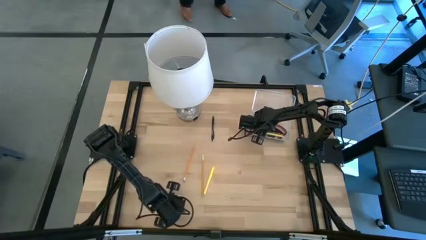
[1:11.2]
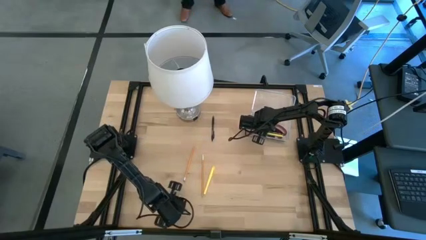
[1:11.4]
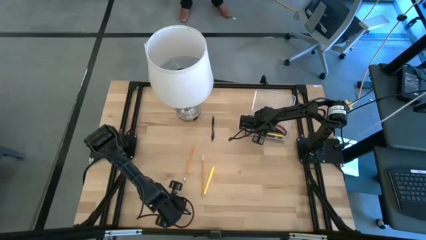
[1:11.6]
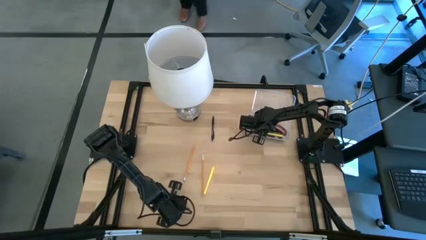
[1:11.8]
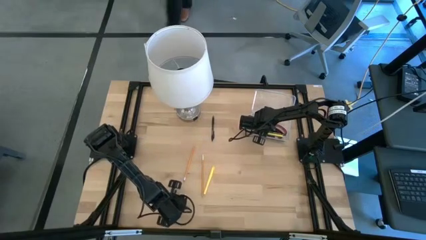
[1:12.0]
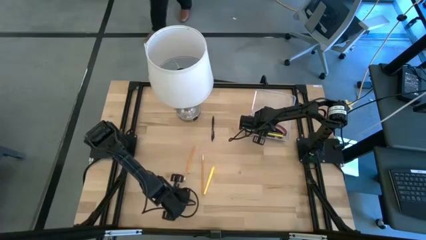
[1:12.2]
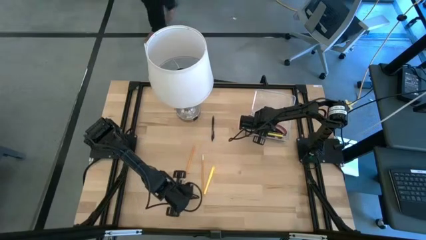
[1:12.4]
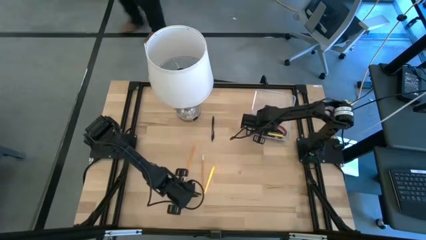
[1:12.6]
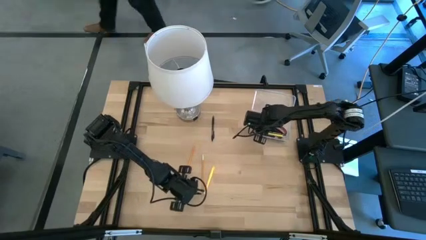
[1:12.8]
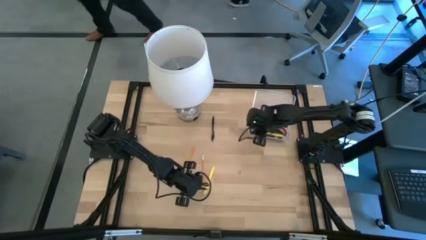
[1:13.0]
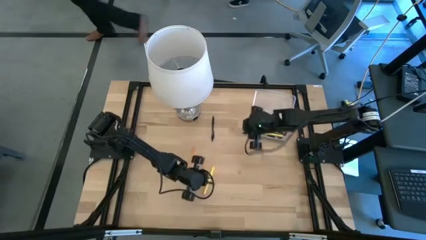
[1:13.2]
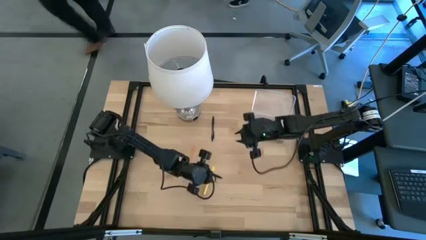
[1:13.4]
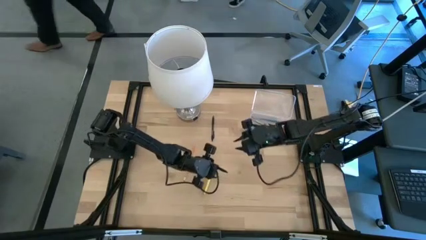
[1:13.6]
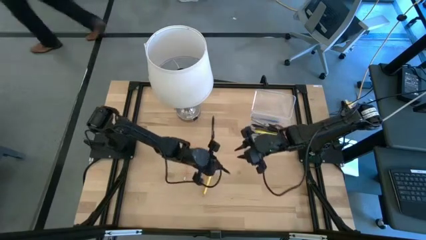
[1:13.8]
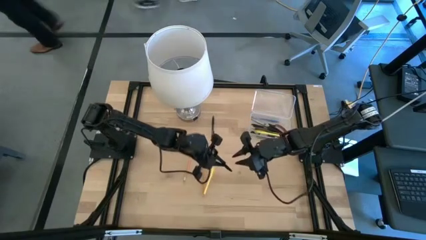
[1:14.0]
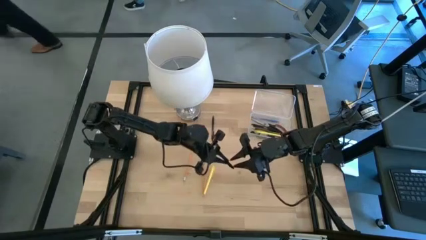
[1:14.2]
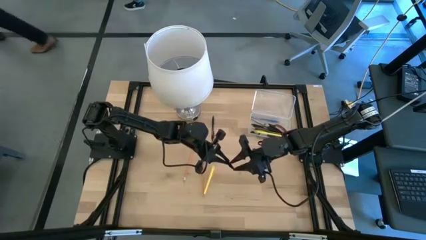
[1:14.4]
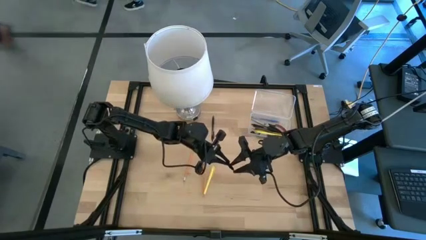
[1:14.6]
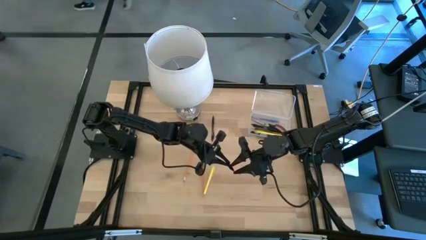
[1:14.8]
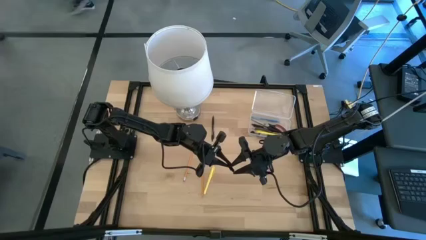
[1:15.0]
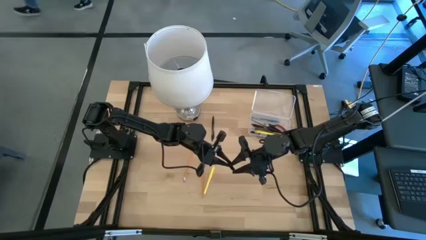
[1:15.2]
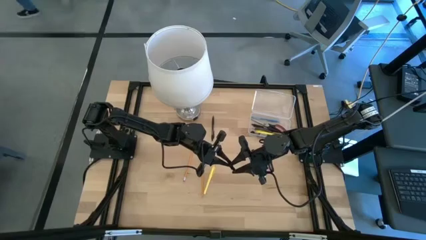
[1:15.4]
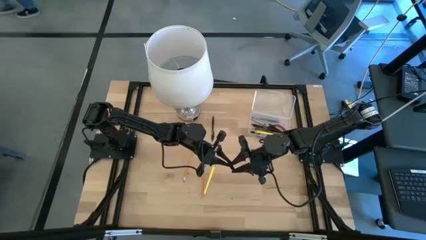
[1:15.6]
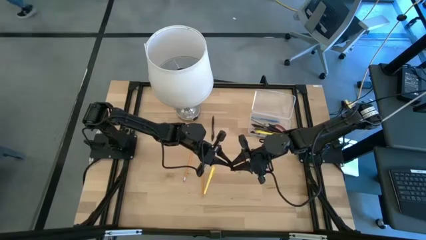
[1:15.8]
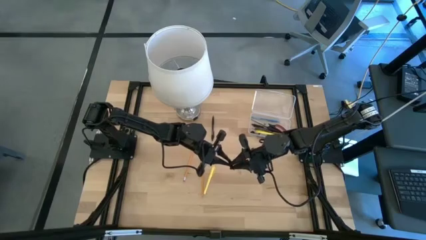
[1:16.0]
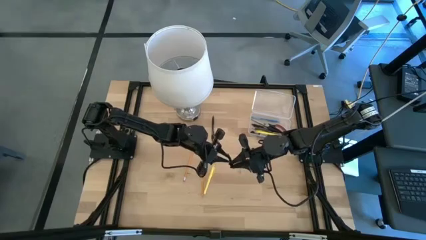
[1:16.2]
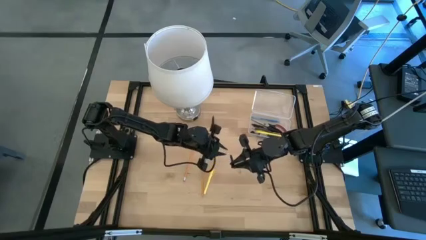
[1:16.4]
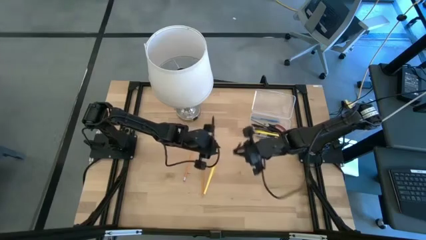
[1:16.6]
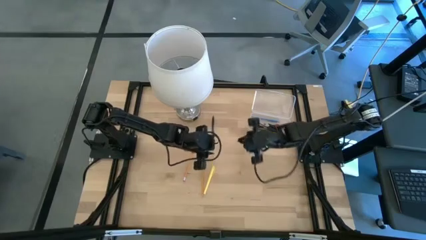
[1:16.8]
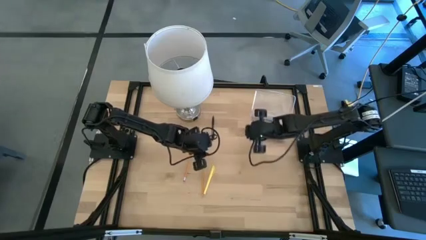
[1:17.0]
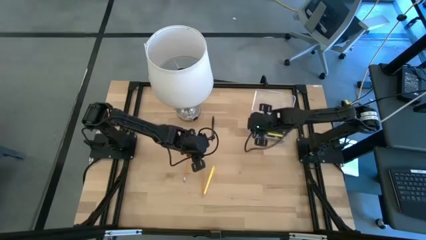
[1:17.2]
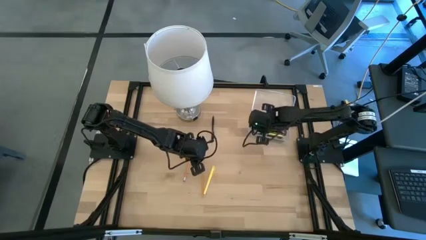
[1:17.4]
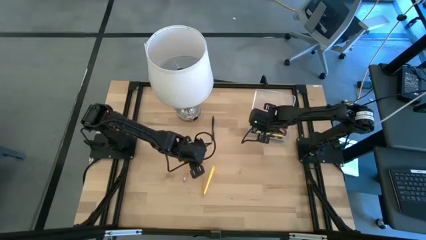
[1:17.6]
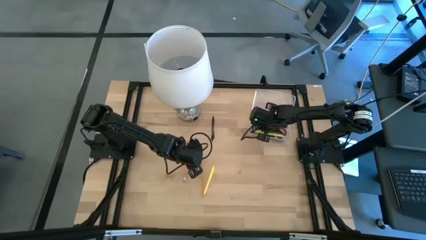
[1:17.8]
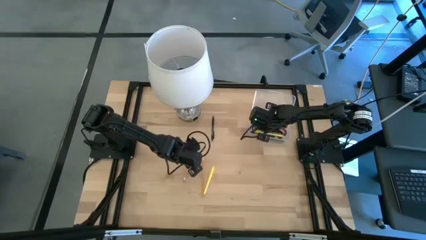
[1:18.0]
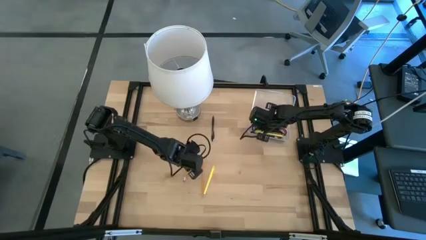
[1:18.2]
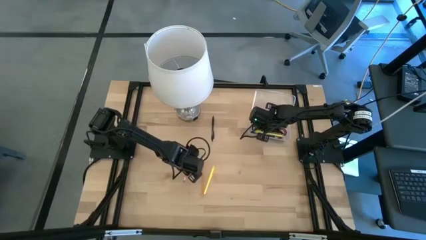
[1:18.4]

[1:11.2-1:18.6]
Task: Pick & place school supplies into a supply box
Put the black pen into the transparent supply box

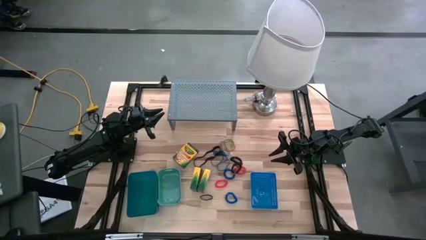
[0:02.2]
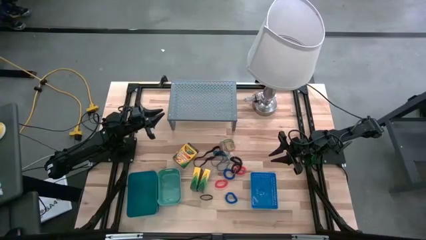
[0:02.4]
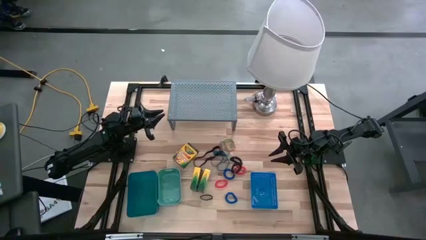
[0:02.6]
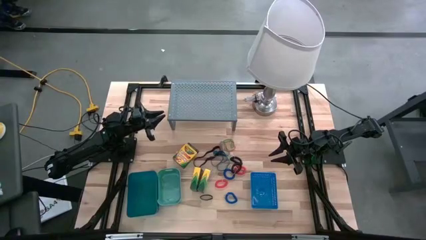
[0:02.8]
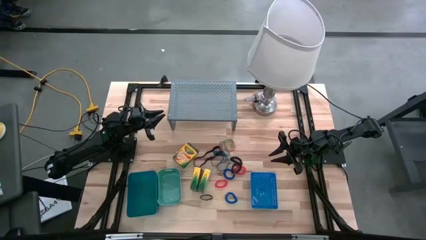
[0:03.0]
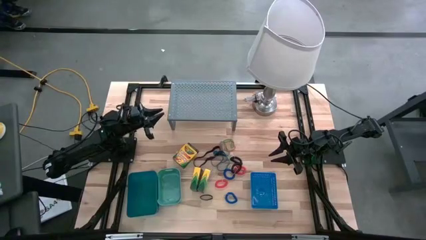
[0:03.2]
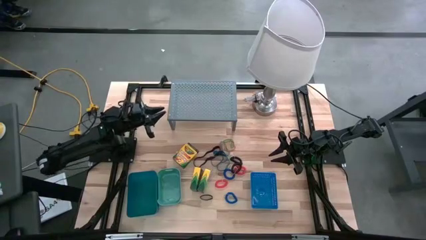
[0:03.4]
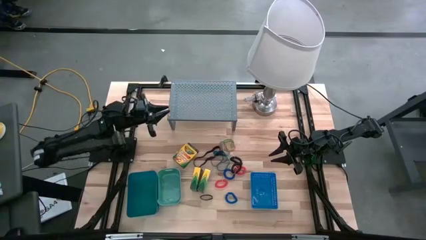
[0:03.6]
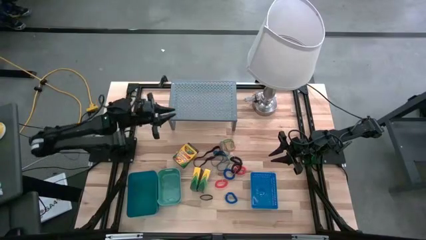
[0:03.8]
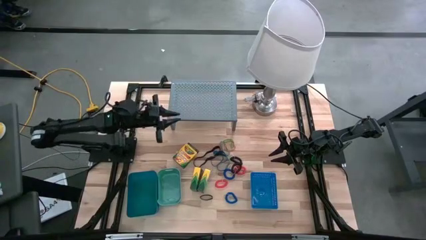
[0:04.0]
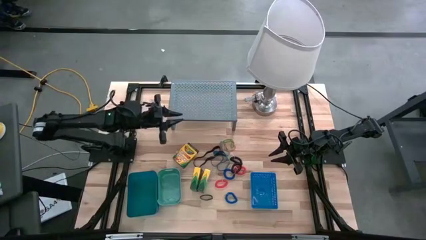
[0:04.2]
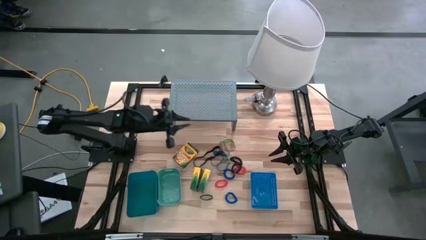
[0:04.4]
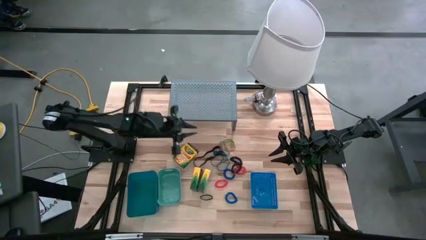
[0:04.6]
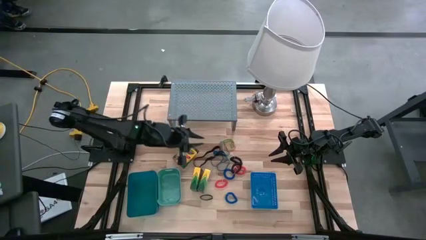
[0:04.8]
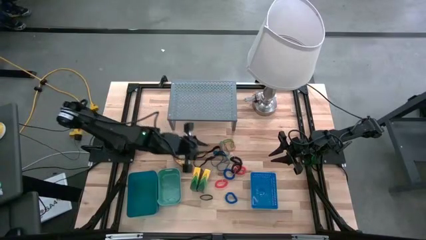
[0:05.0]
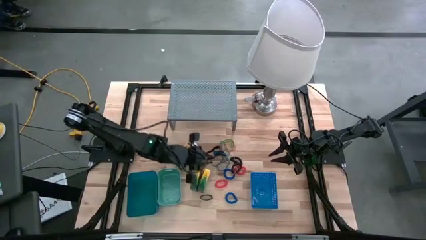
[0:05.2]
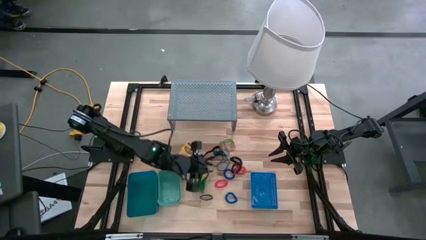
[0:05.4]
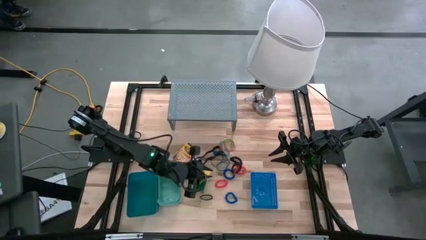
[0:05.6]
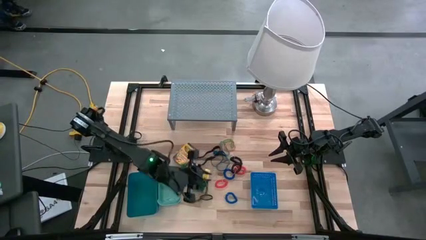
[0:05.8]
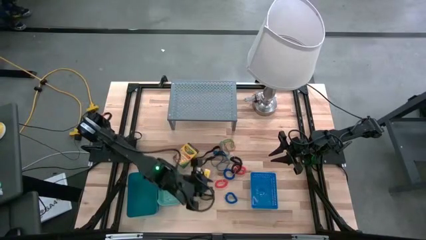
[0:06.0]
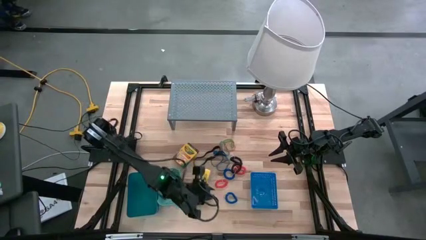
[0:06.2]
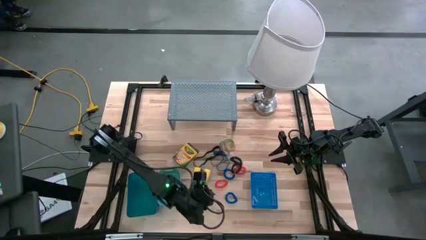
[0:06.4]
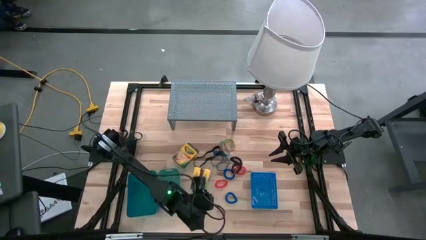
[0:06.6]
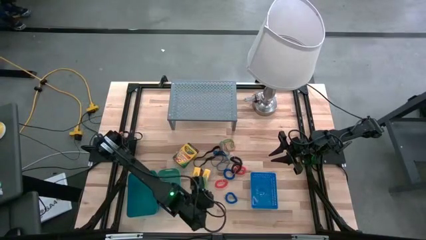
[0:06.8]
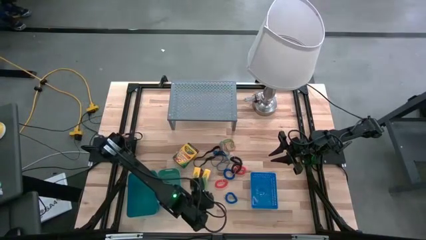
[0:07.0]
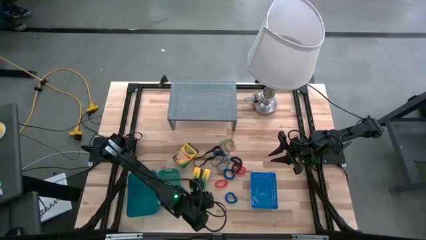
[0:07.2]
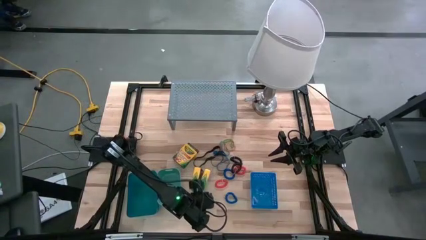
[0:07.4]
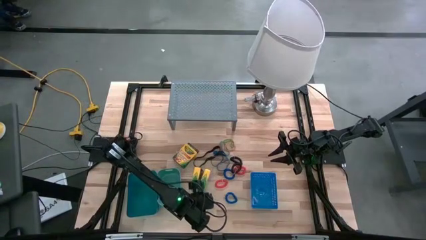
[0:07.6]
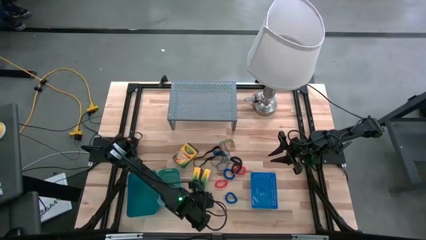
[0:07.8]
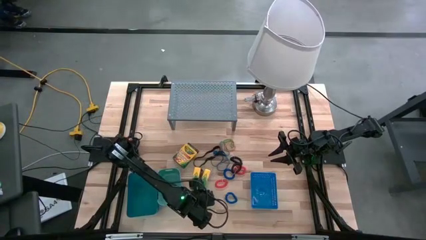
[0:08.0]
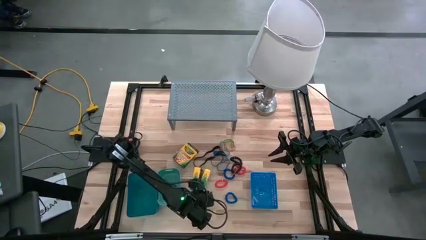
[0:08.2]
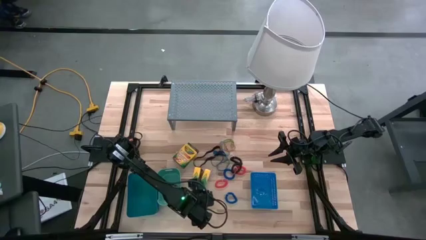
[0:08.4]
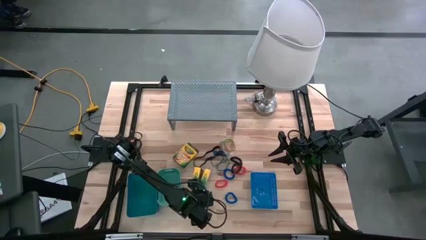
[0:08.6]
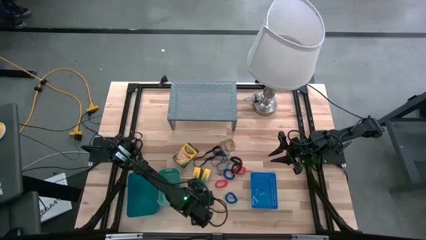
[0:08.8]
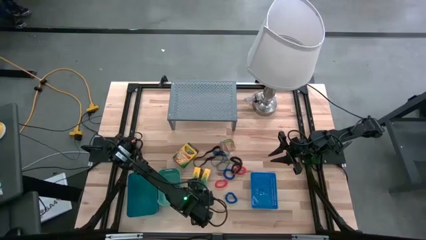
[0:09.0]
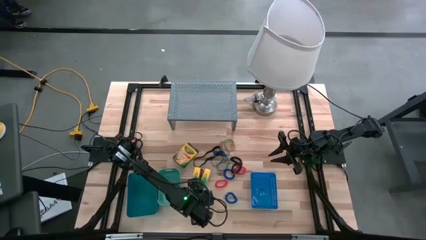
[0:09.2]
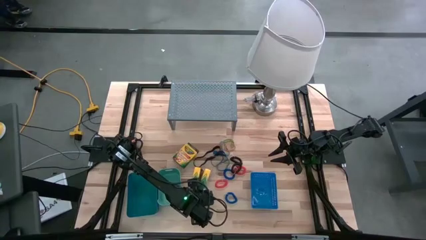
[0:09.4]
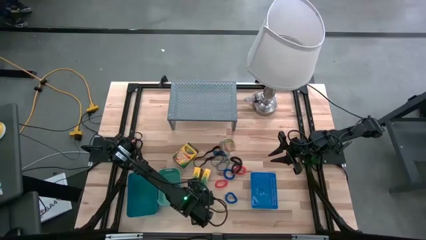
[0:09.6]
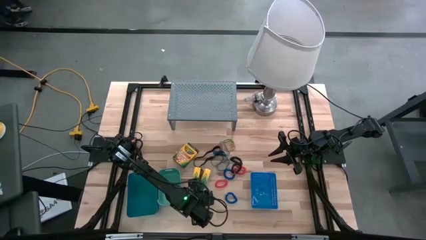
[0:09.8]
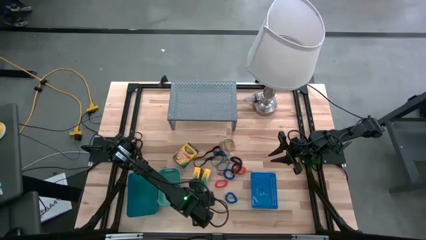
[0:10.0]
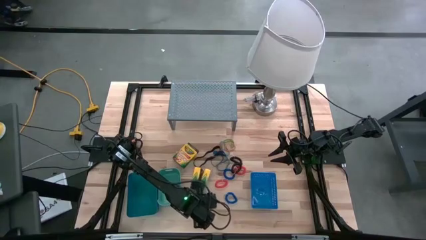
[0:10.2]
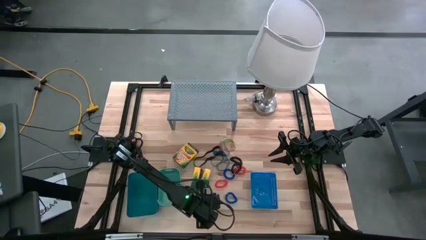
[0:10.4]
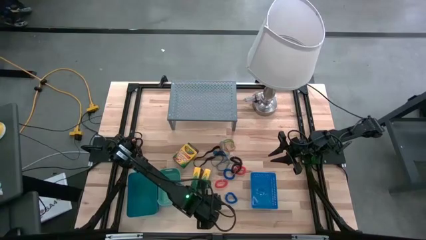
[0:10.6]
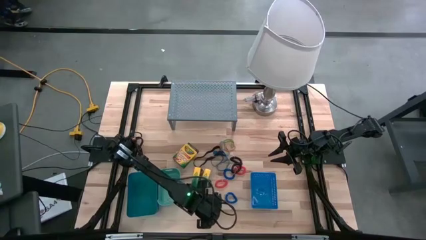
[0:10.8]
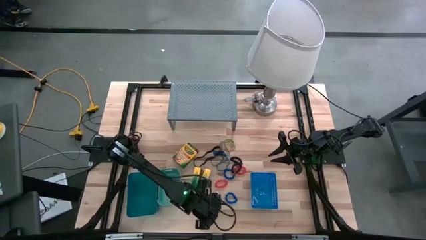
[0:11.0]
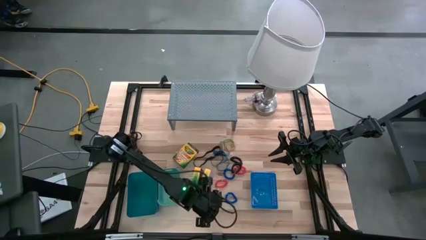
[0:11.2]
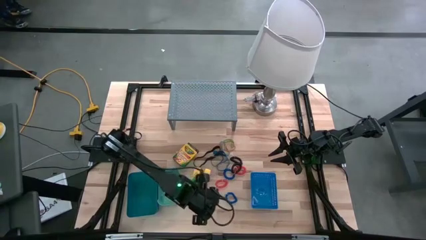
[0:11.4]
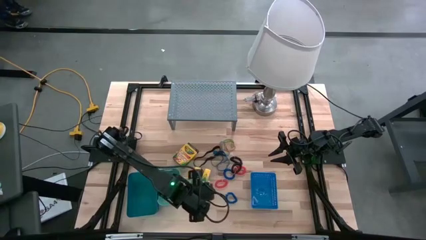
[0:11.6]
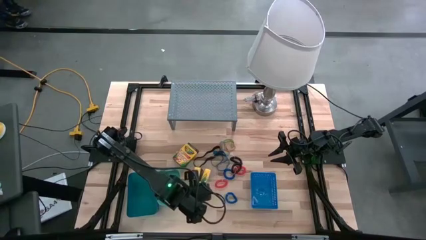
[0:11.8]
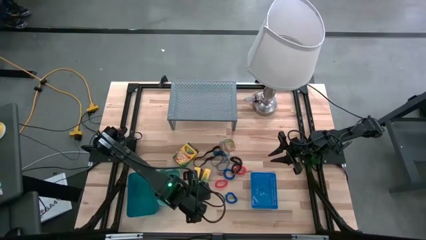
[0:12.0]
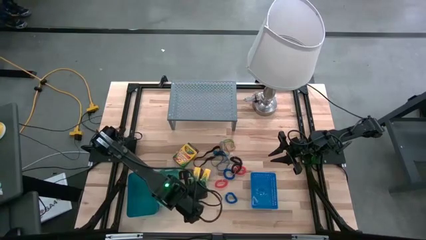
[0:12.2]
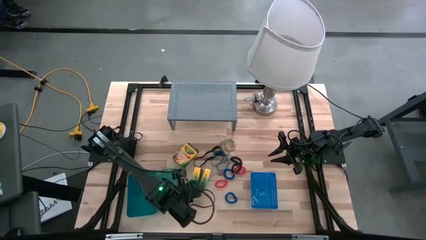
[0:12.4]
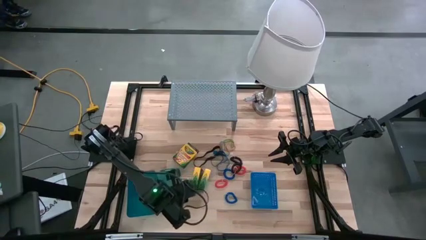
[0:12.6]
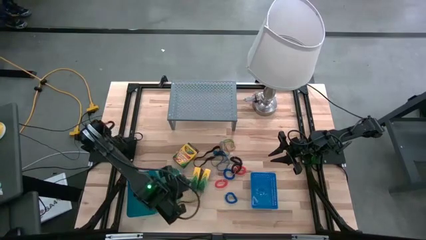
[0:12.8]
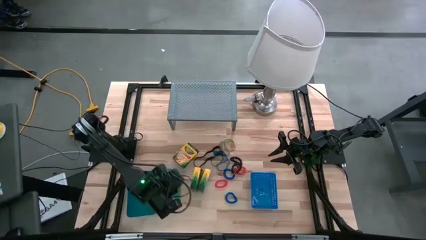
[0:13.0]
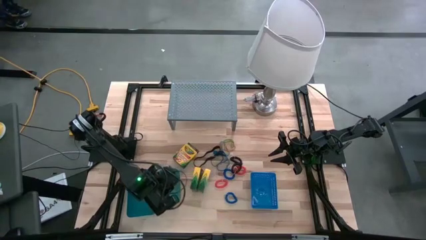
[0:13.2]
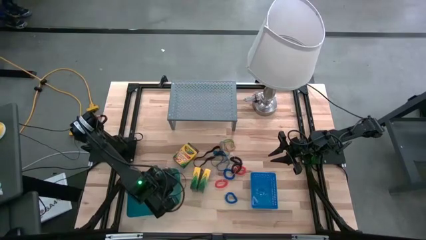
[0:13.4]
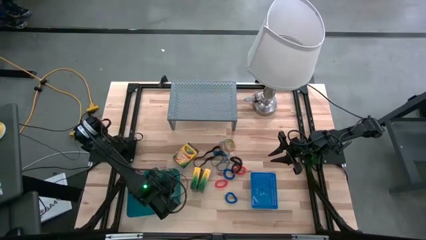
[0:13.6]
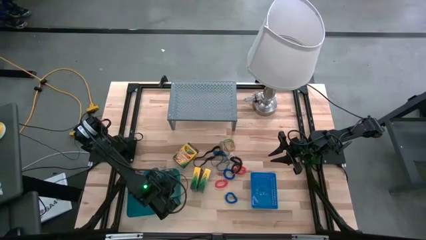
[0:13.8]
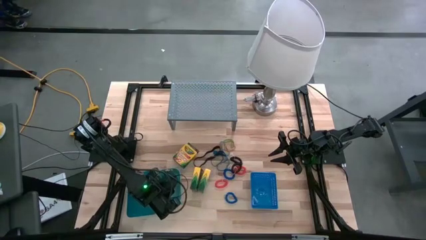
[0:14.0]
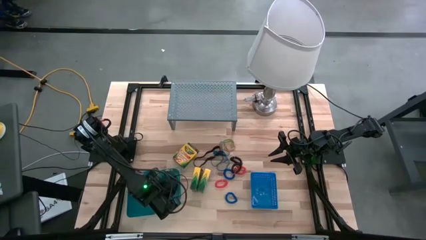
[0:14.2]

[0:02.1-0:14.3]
Task: Pick & Place Office Desk Supplies
Put the bottom black rubber band into the green bin
